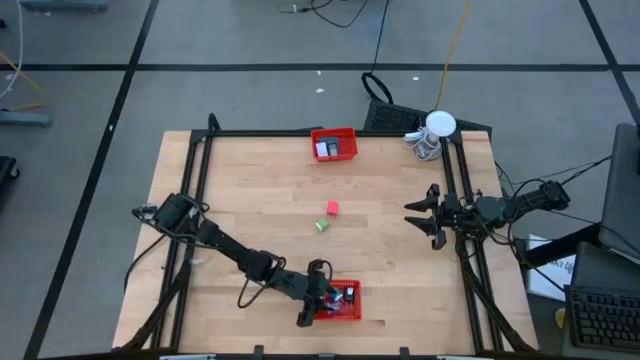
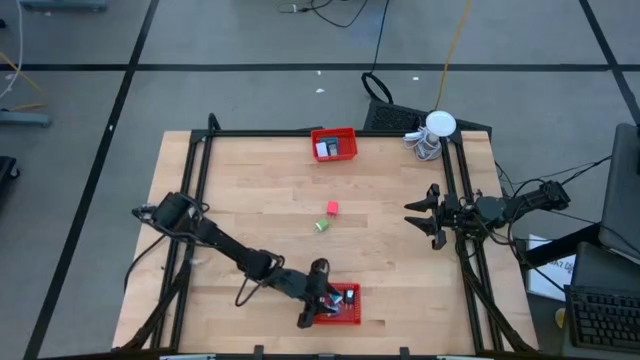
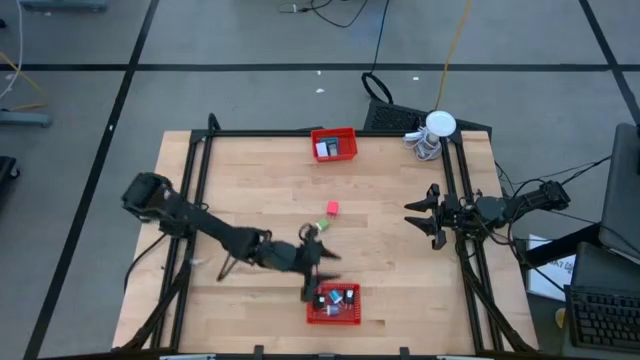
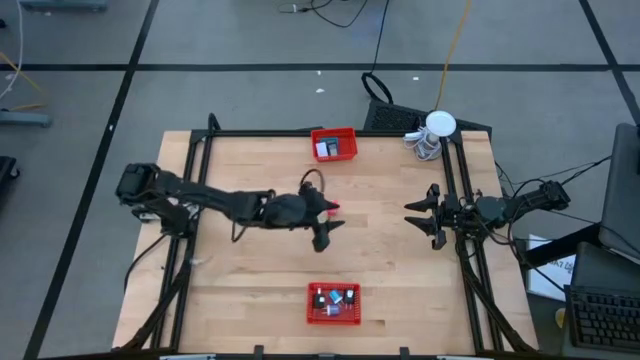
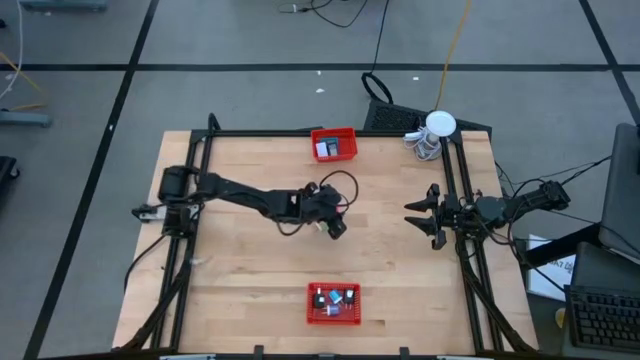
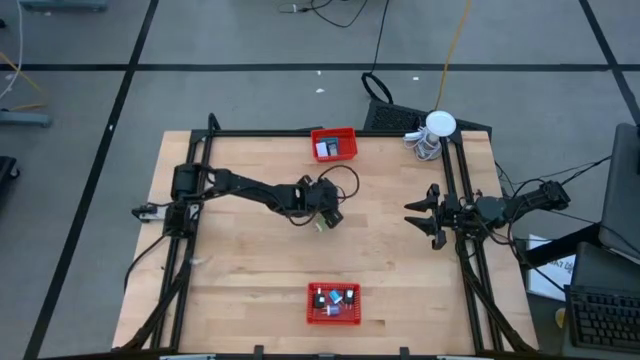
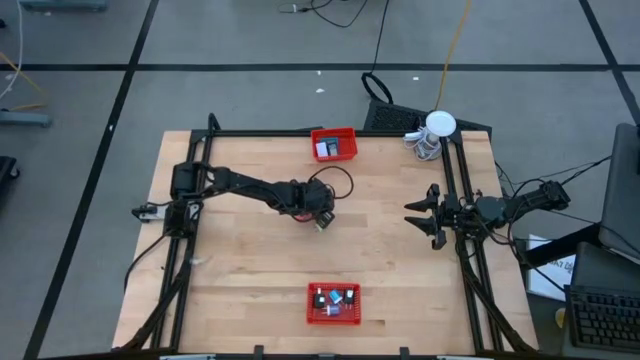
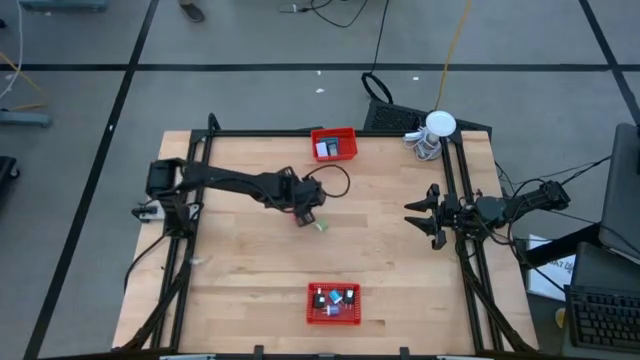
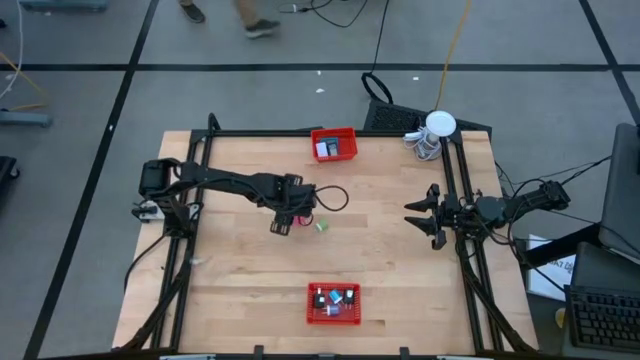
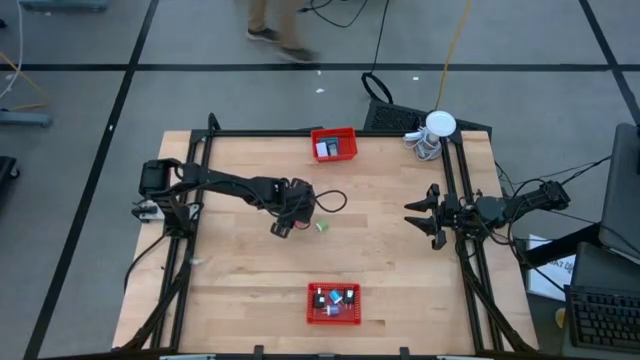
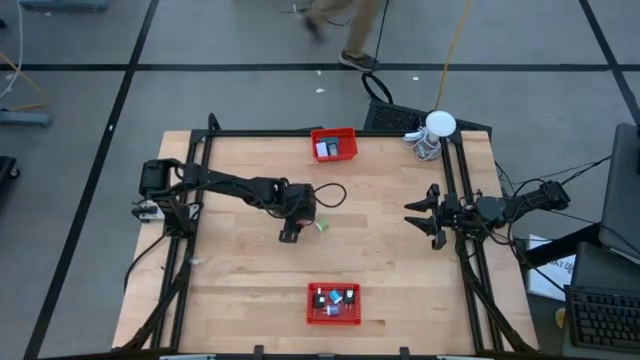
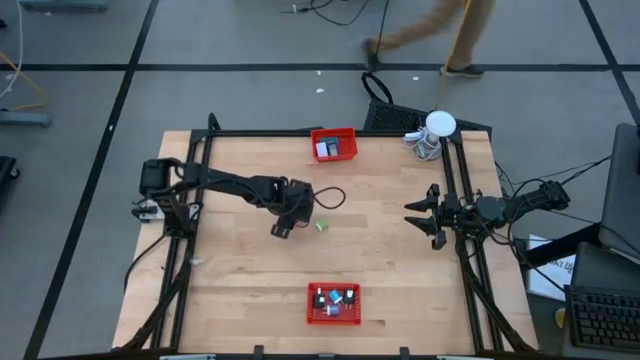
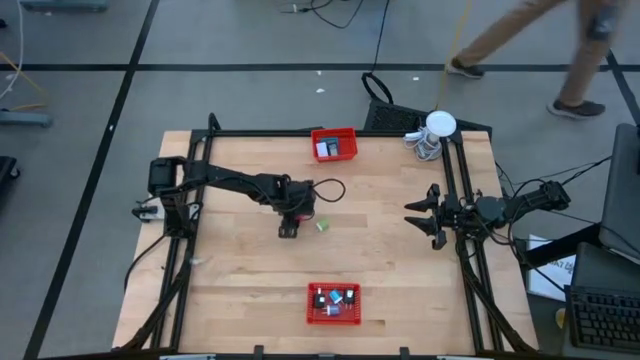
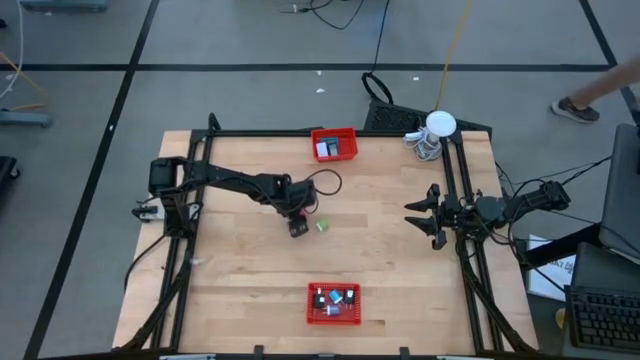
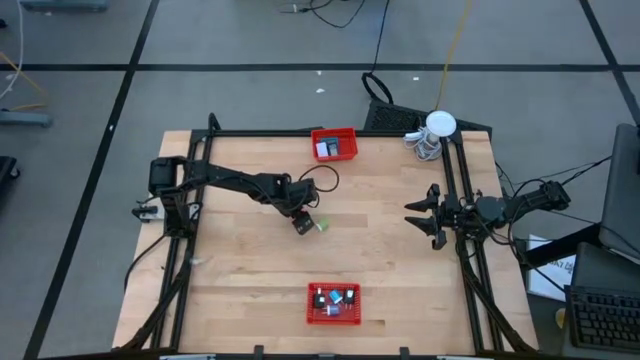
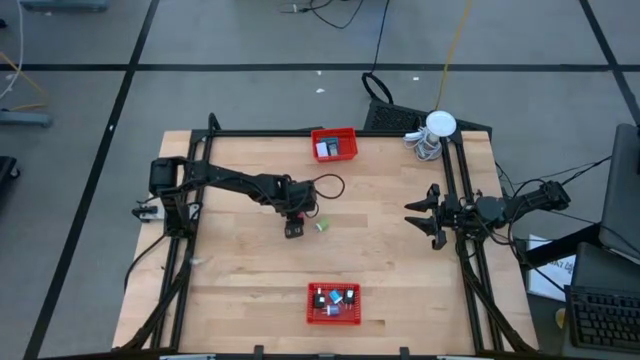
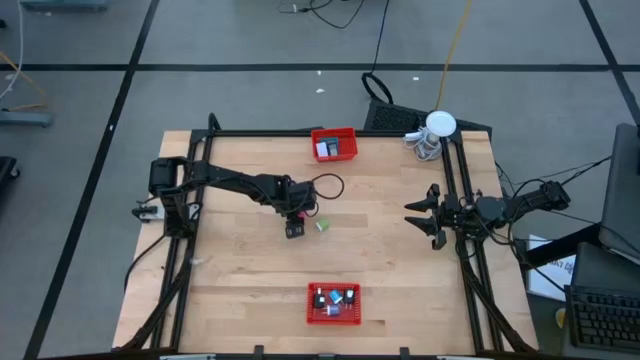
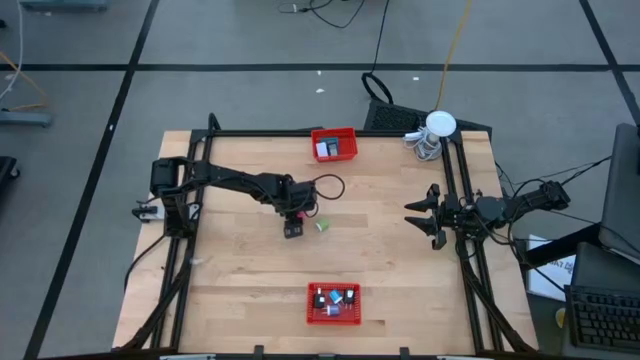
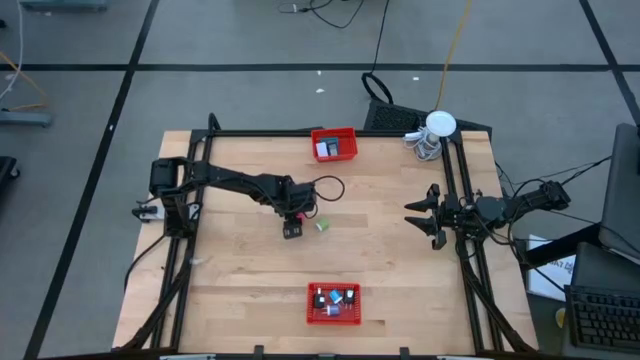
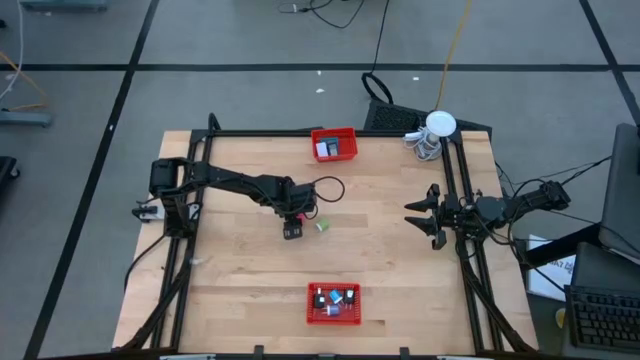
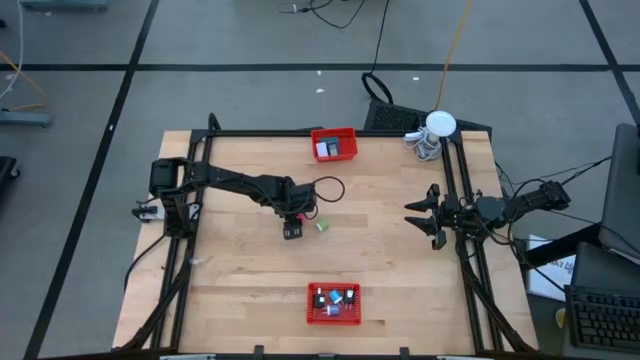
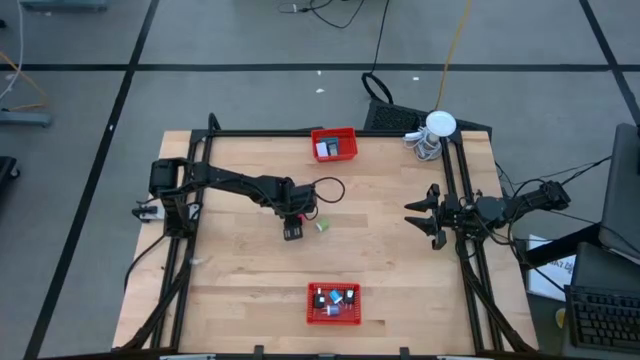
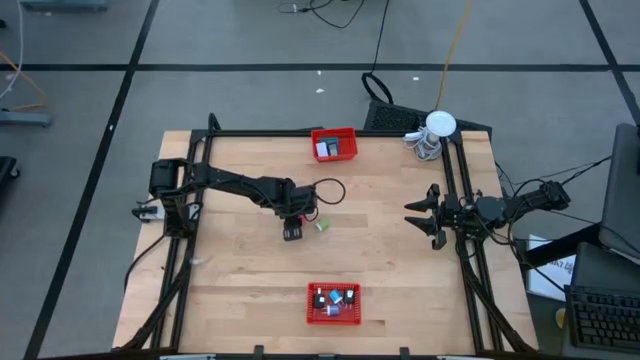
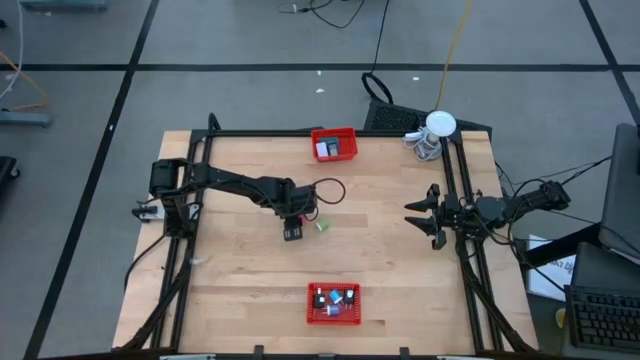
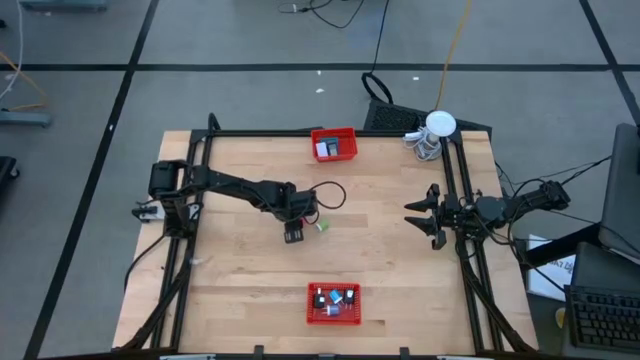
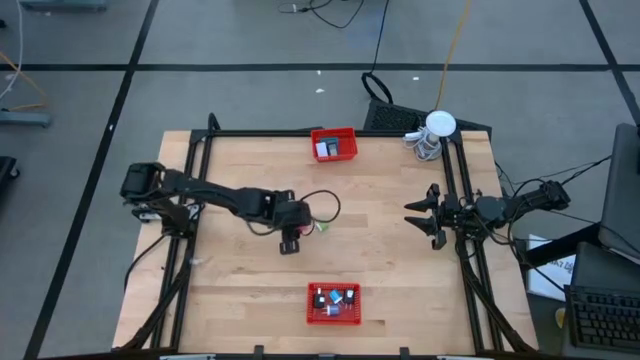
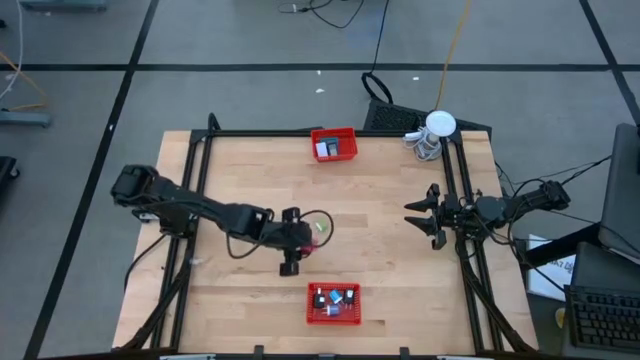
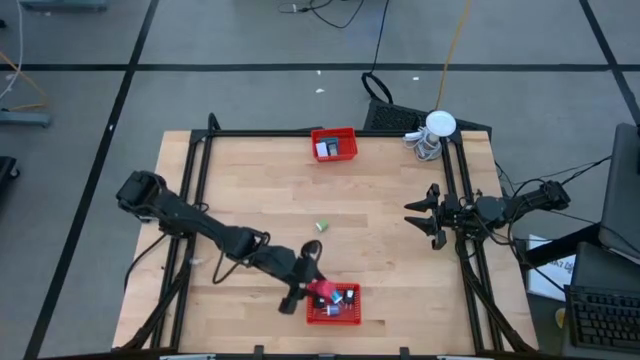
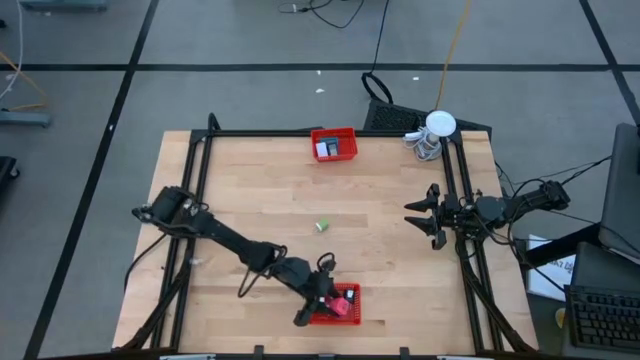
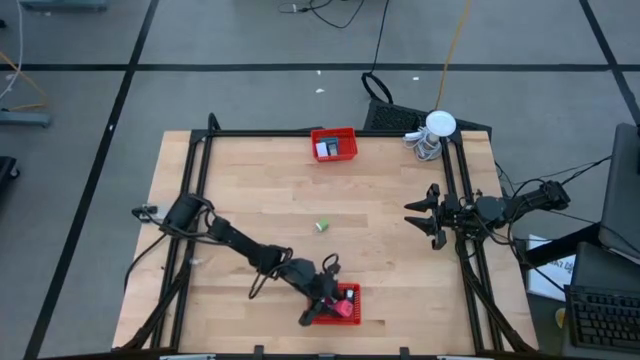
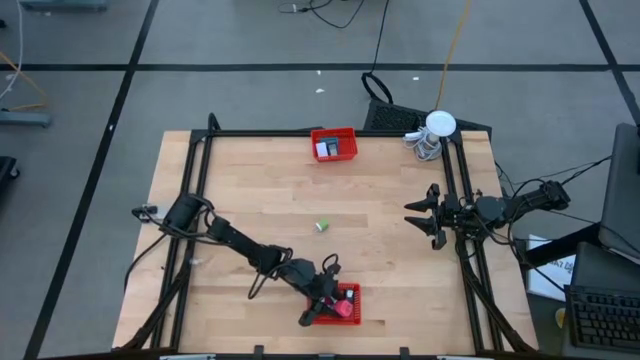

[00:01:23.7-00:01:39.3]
Task: Pick & Place Office items
Put the pink charger adapter into the bottom orange bin

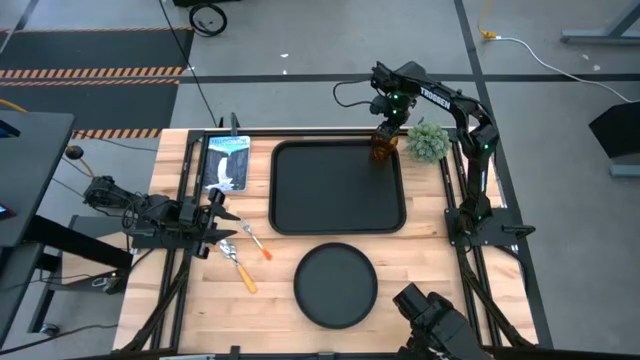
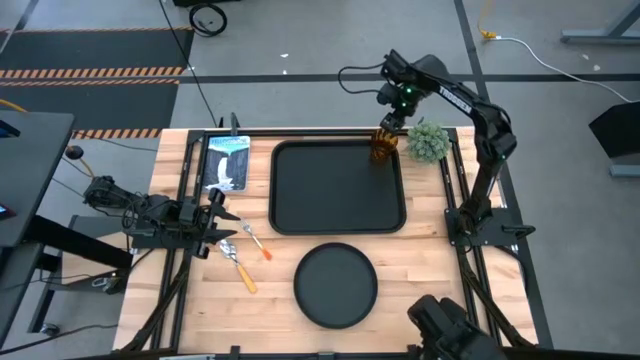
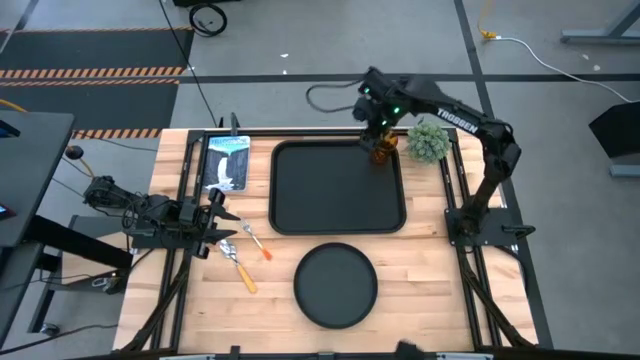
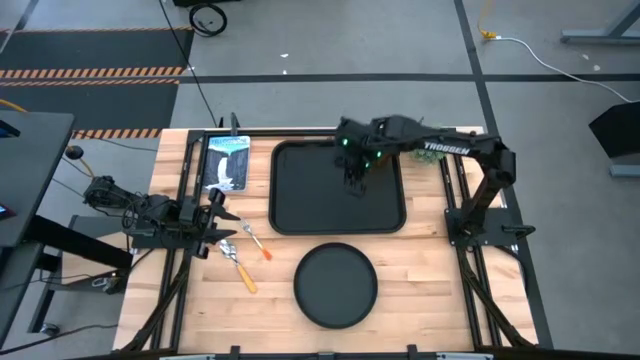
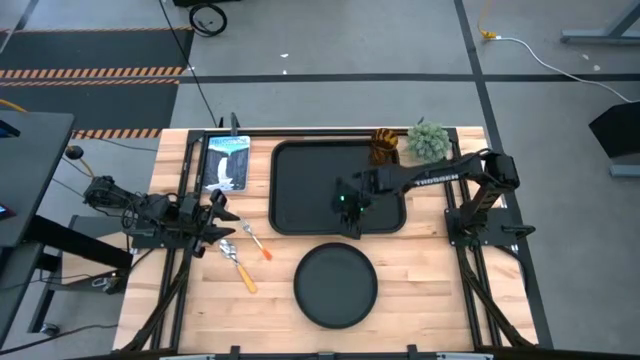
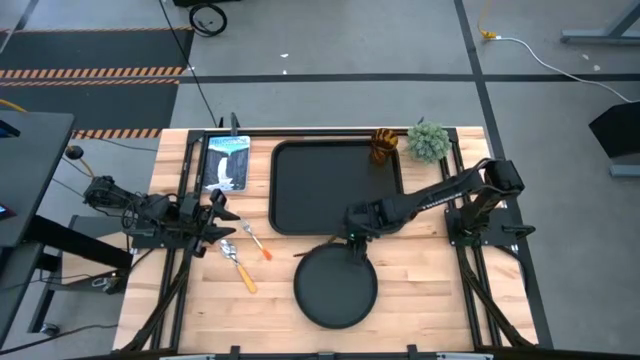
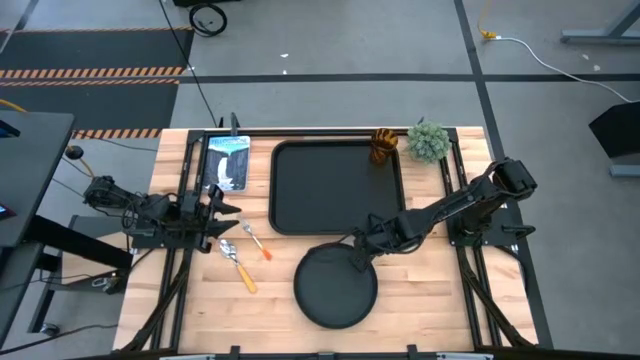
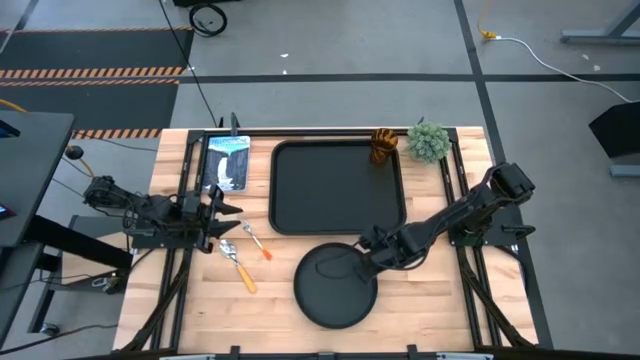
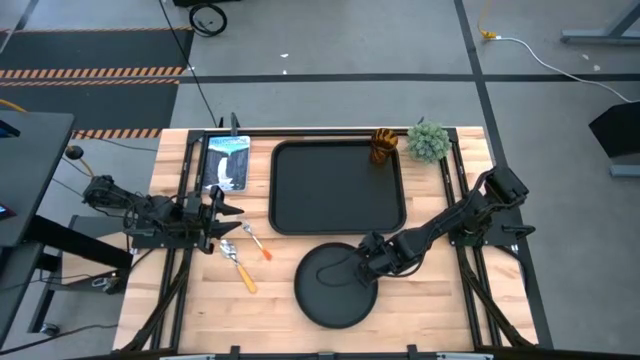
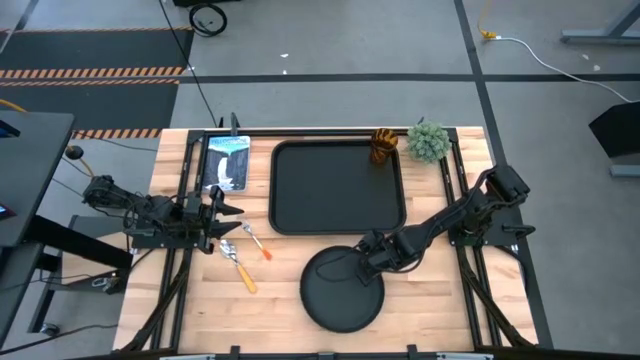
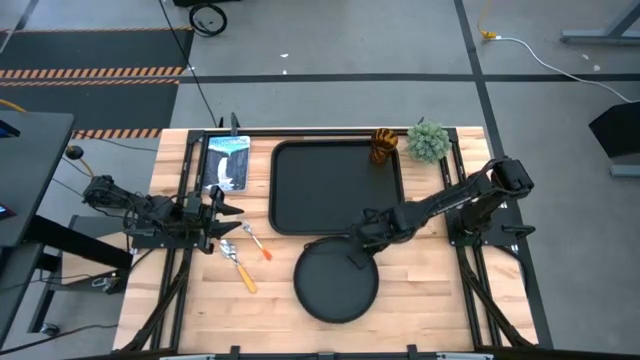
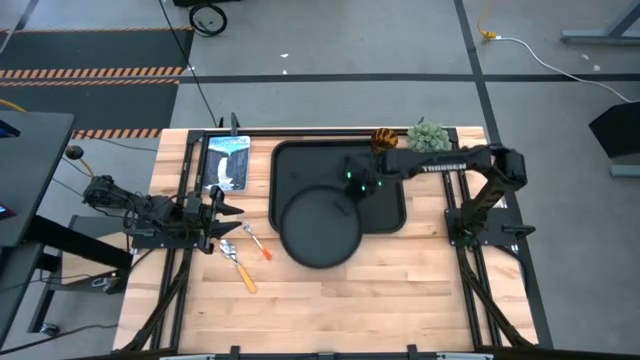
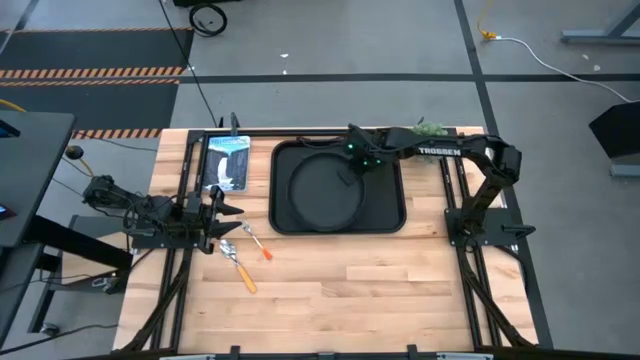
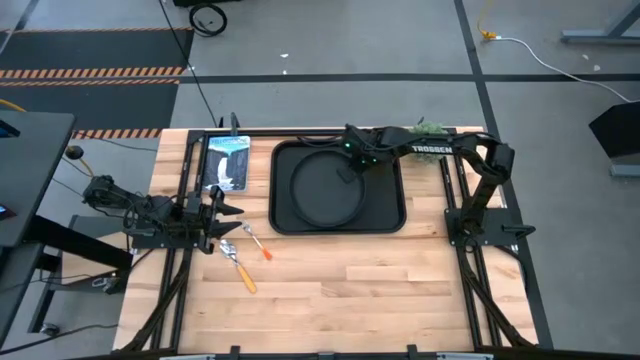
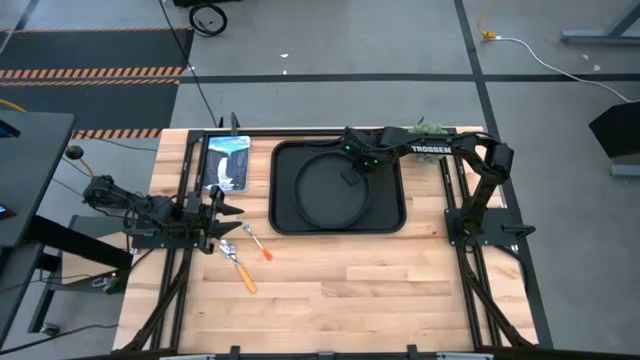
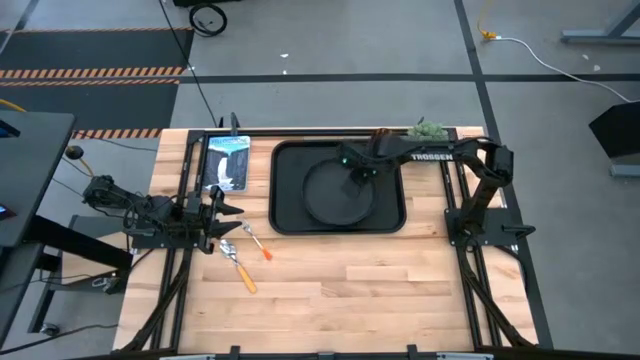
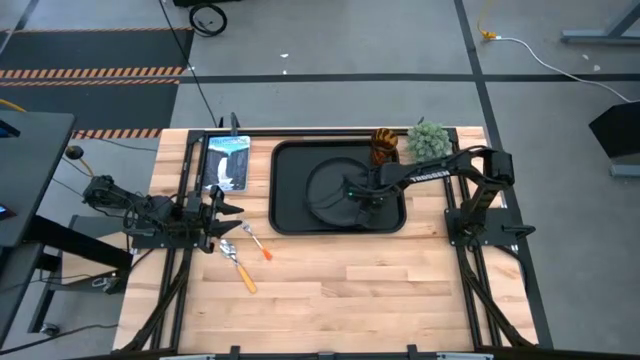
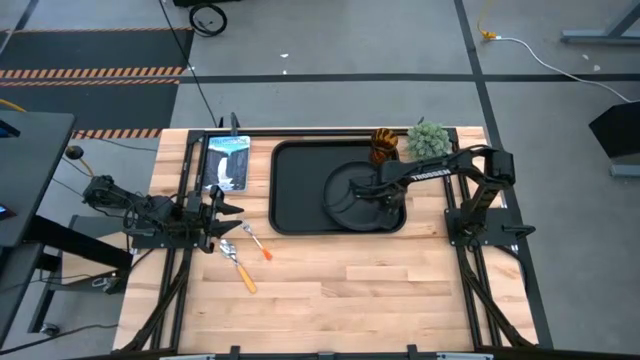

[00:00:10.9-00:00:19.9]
Task: Pick and place plate/cup/fork/spoon on tray
Put the black plate on the black tray to the bottom left of the brown cup
